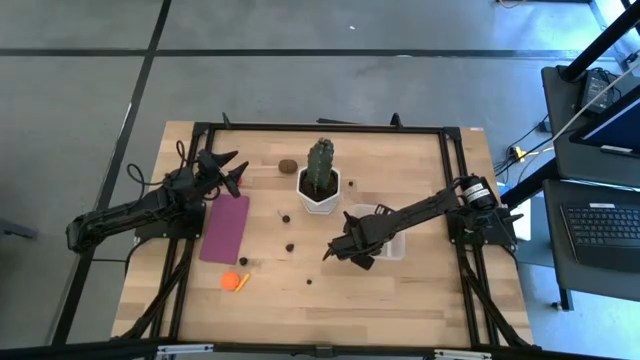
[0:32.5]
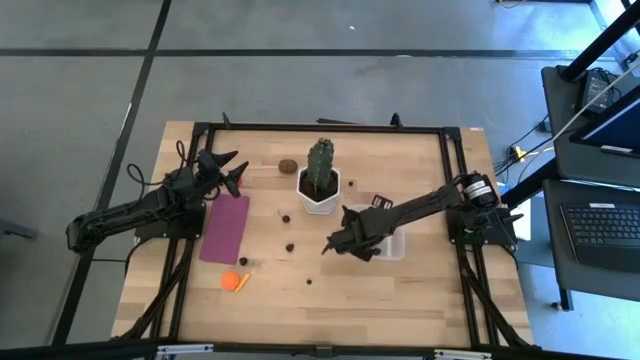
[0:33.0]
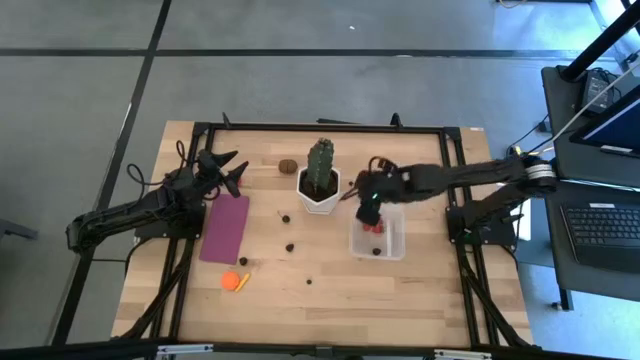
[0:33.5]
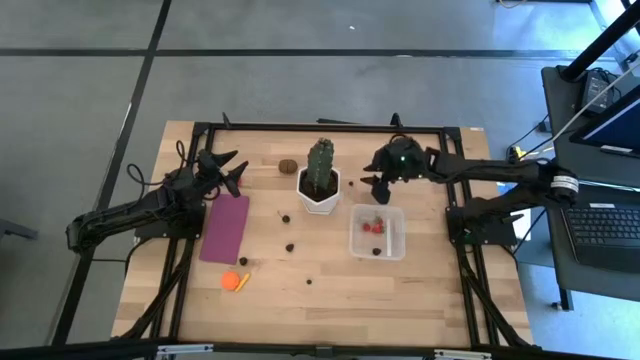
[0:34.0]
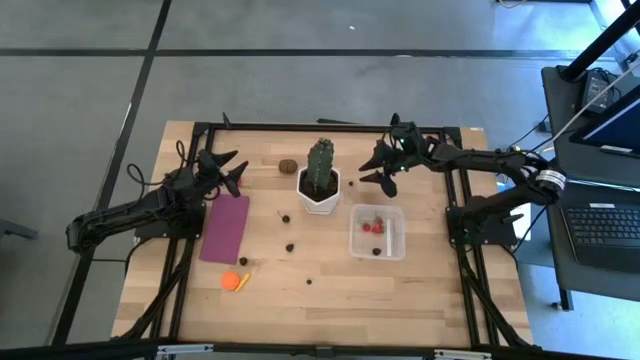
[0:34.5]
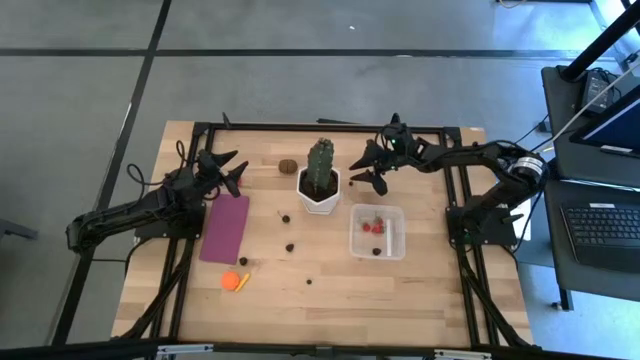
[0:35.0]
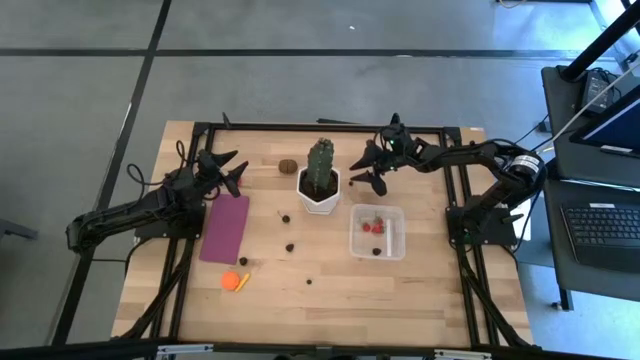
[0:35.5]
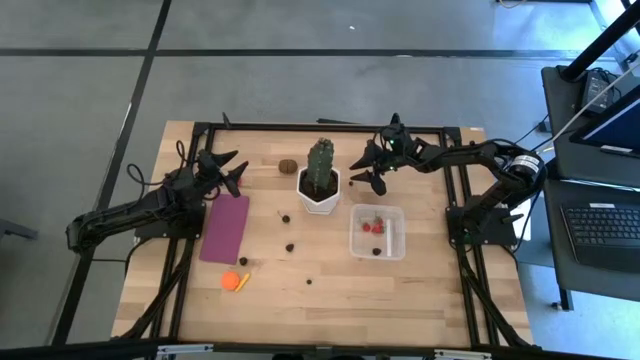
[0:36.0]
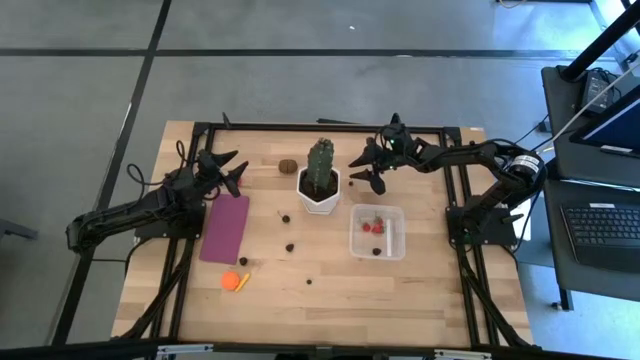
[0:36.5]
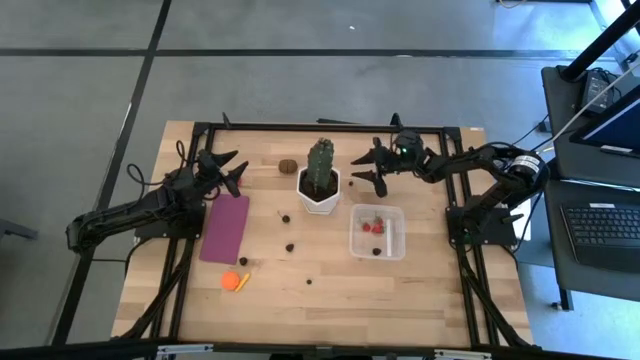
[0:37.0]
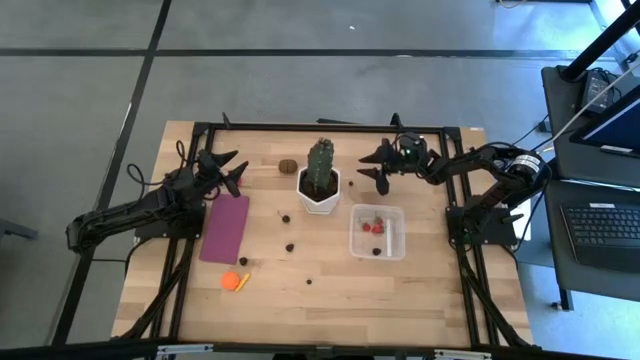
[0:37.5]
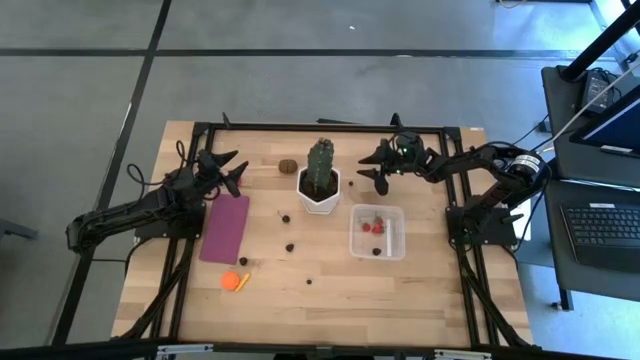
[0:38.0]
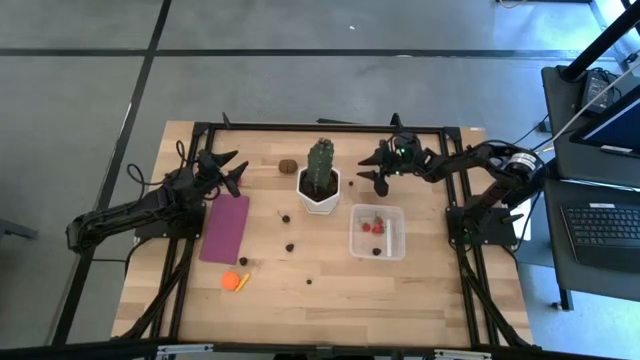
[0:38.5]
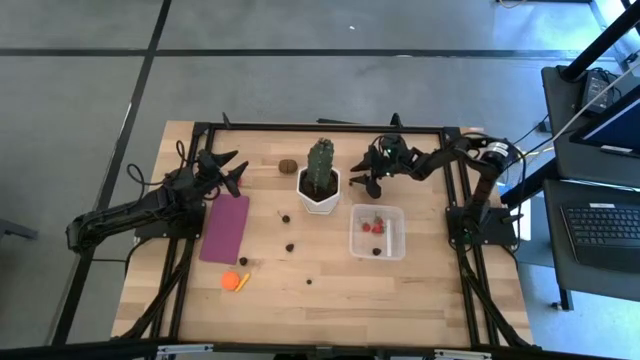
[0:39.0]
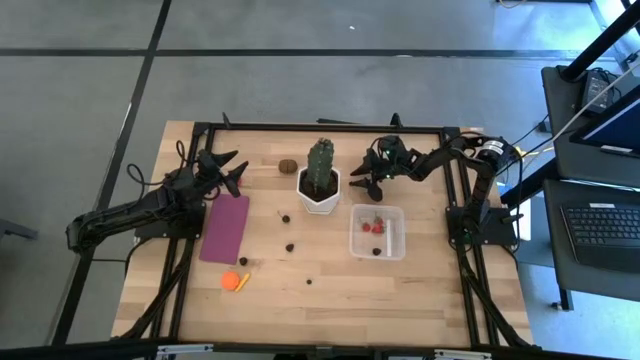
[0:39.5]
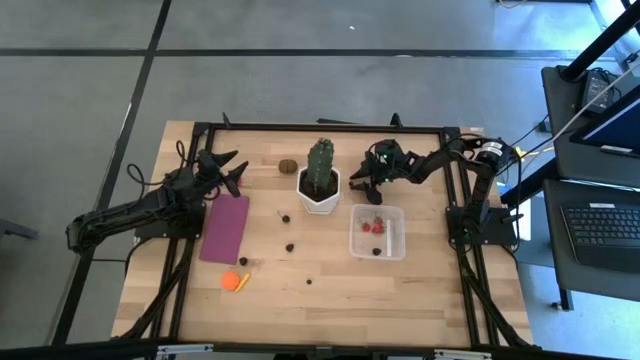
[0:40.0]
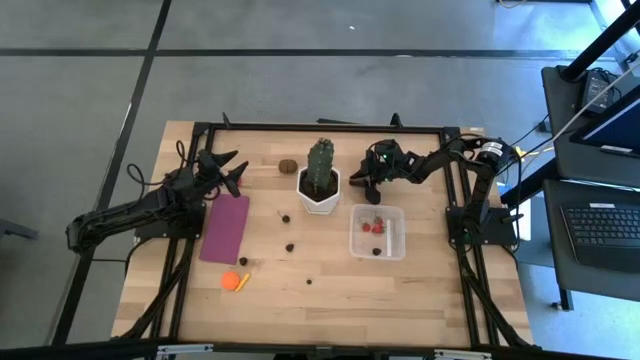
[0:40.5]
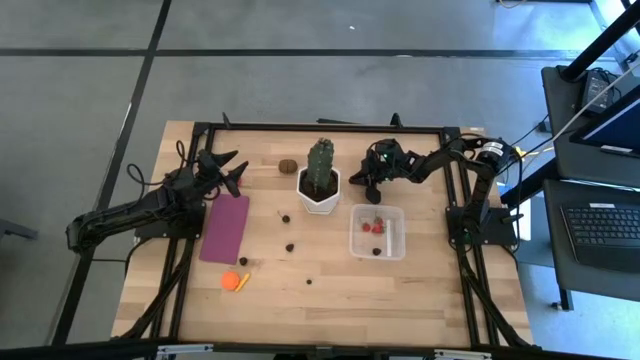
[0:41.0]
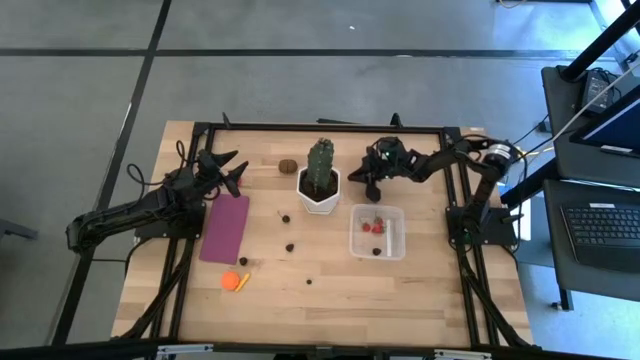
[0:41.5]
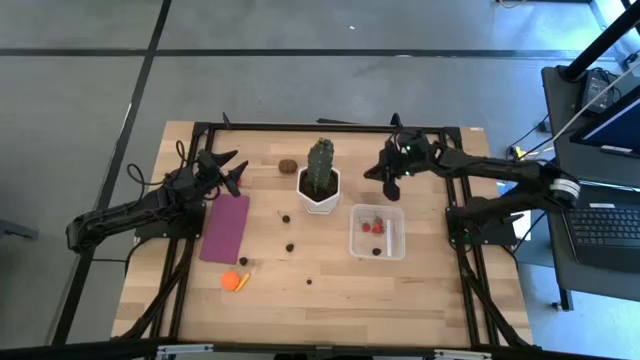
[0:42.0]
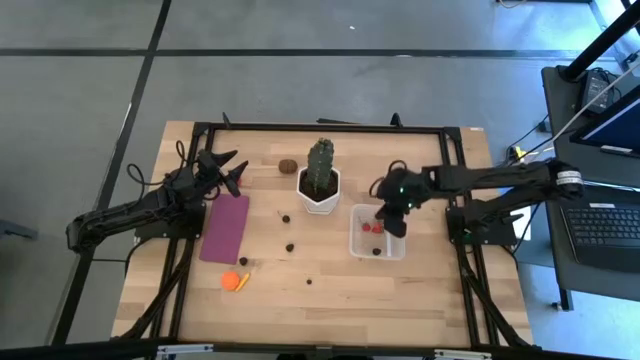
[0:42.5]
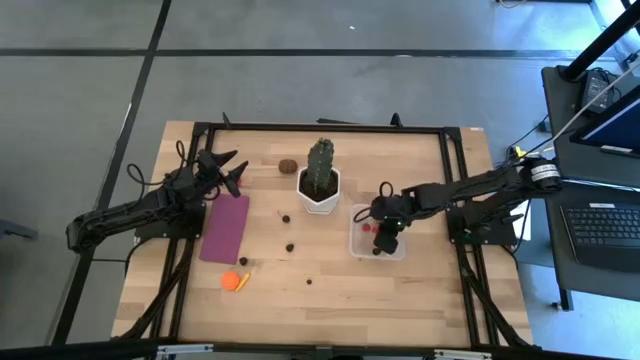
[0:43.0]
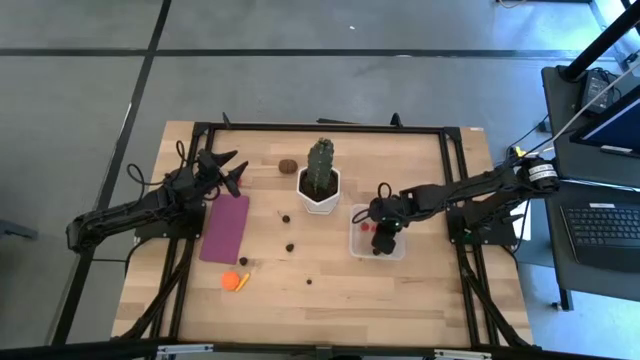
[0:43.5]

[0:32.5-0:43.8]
Task: Pick and placing Produce into tupperware
Put the blueberry into the transparent bin

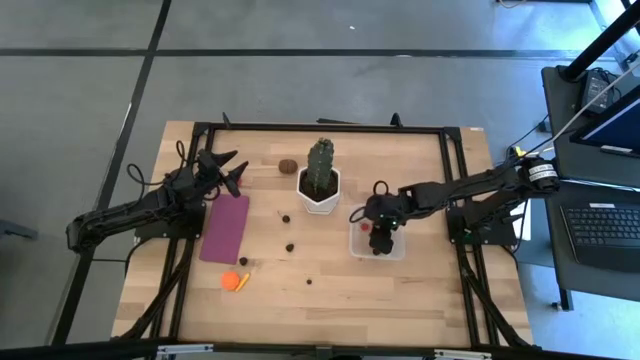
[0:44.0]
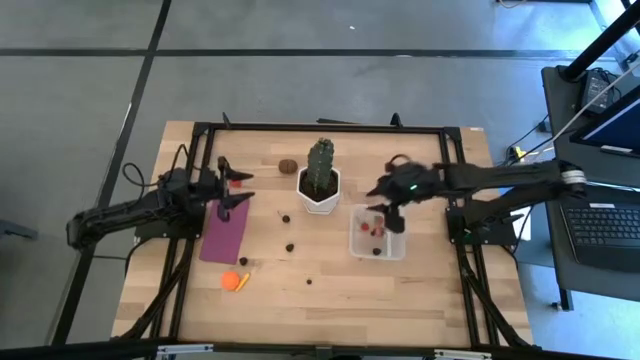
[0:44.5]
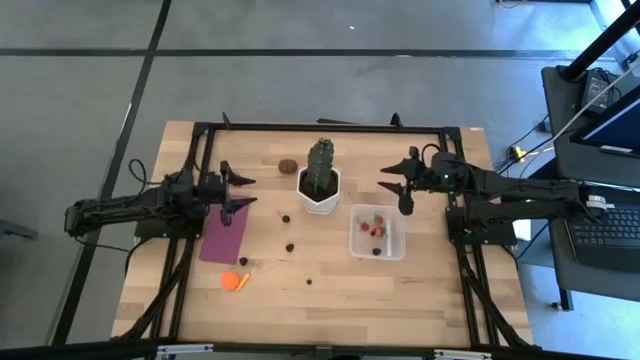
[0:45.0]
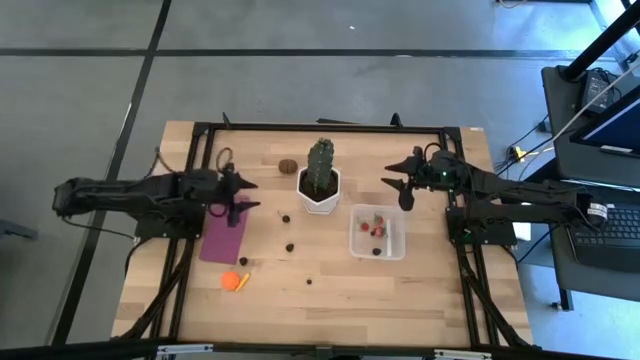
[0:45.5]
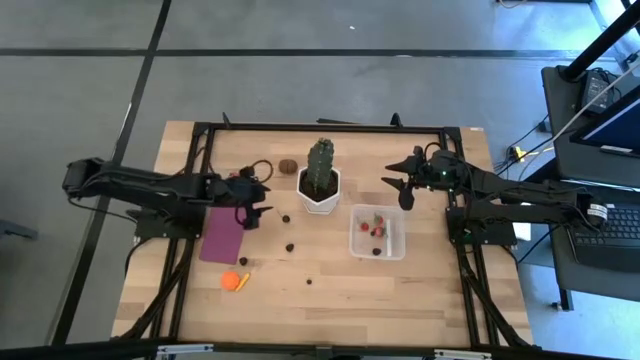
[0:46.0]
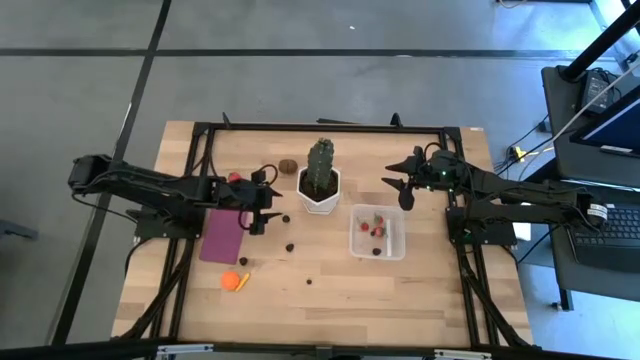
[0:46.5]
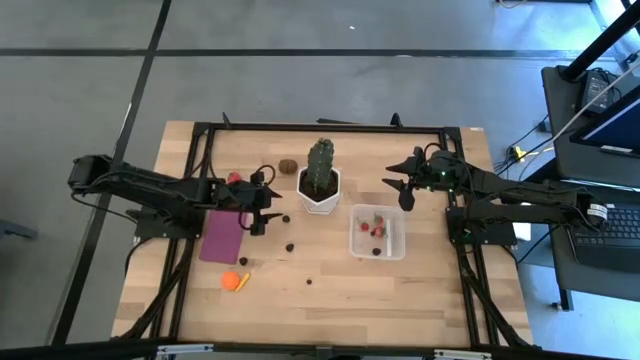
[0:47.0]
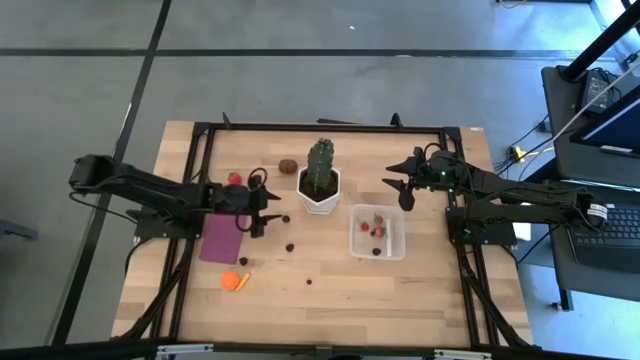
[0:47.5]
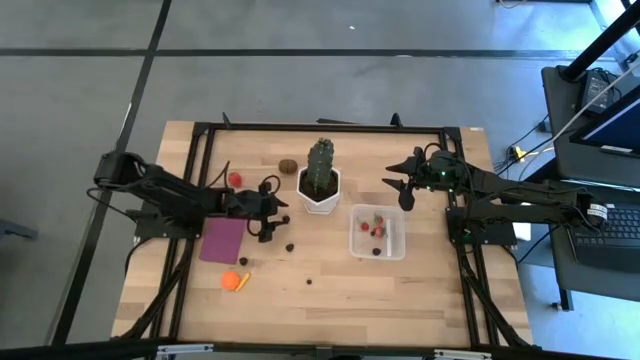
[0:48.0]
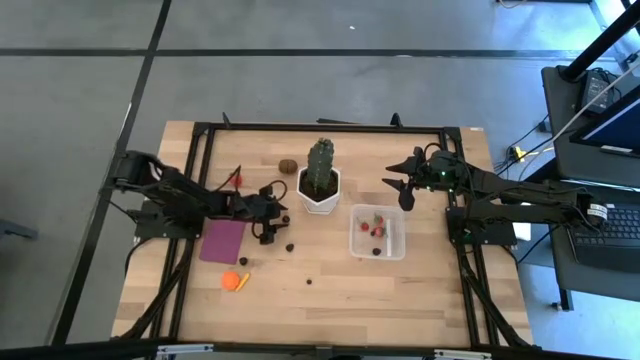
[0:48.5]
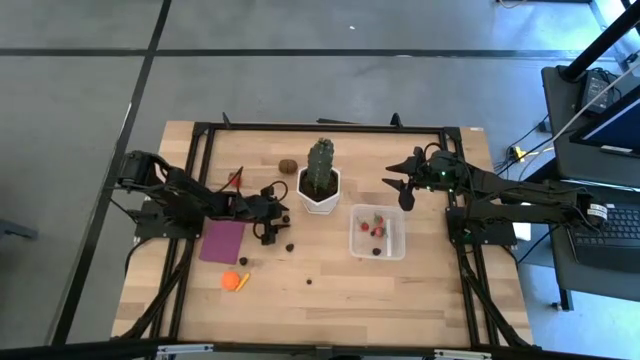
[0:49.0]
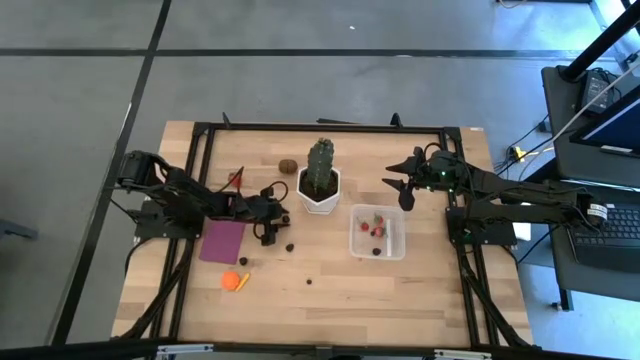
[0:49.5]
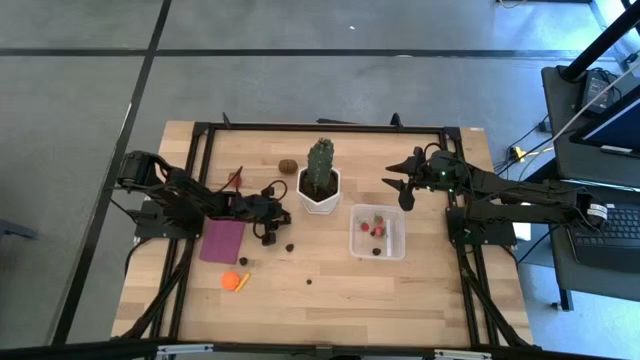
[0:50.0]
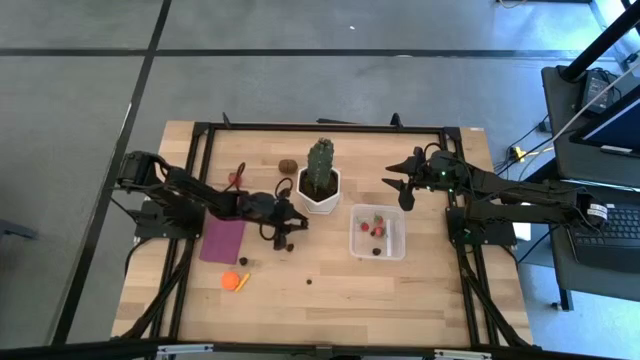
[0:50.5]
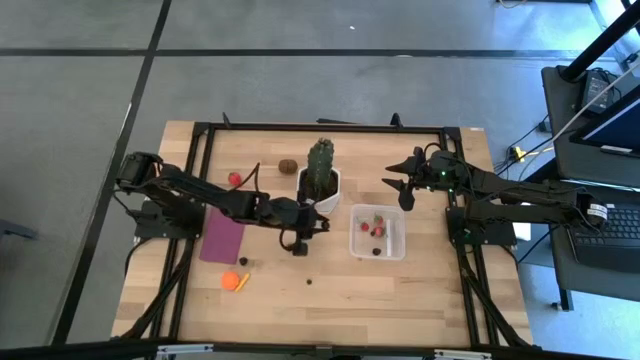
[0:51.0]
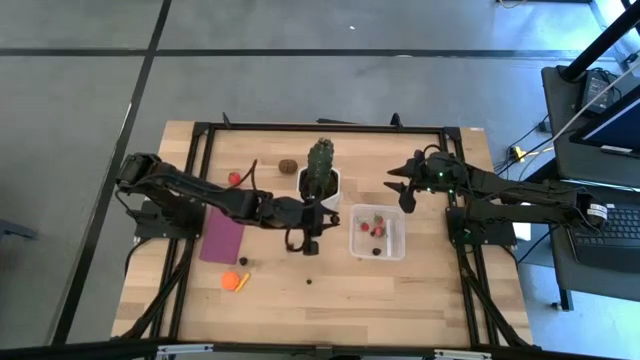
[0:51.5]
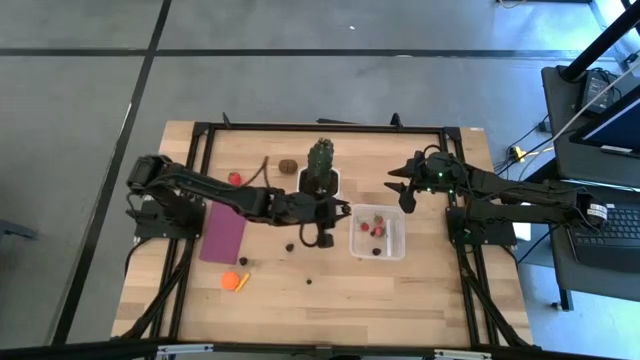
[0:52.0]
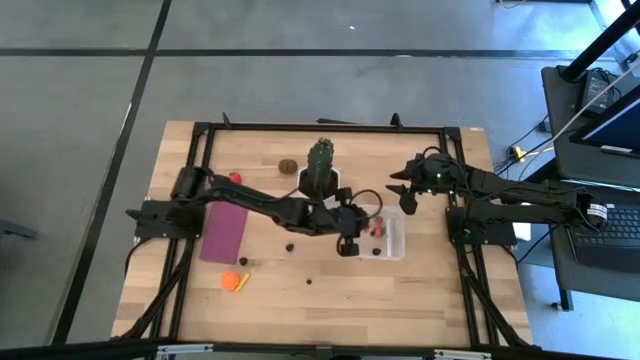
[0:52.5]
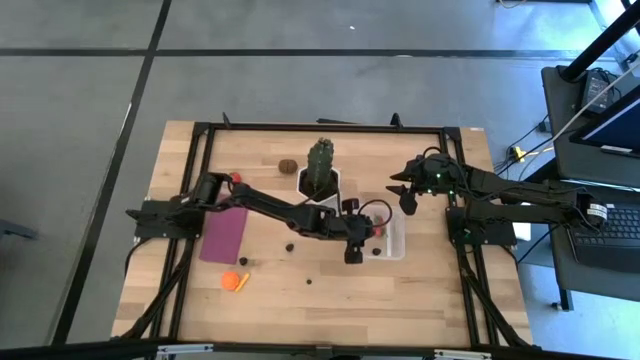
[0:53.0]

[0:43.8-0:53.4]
Put the black cherry into the transparent bin

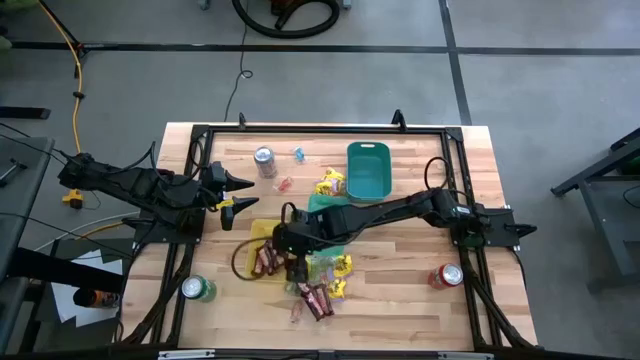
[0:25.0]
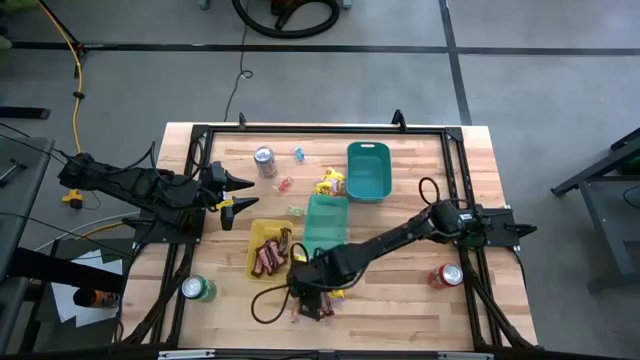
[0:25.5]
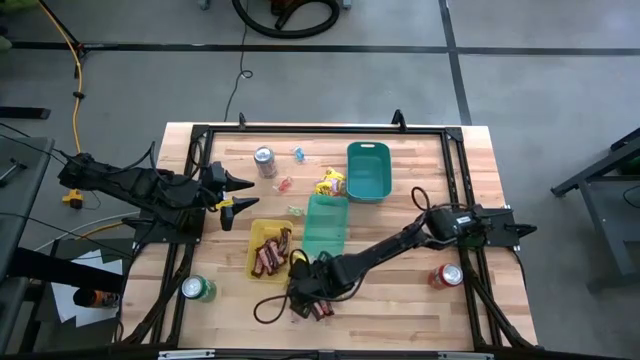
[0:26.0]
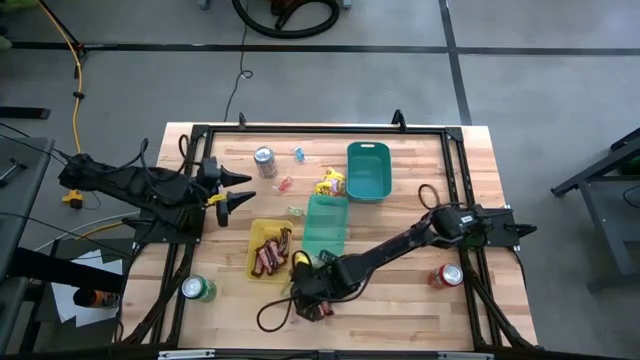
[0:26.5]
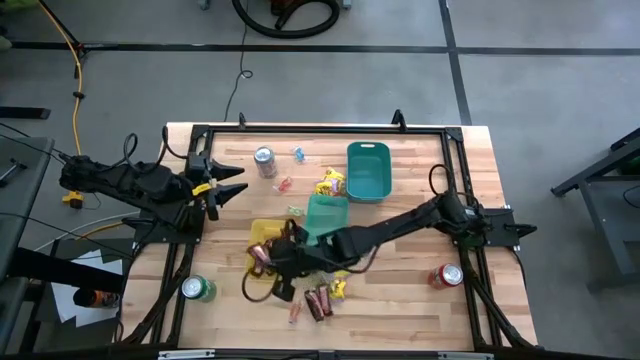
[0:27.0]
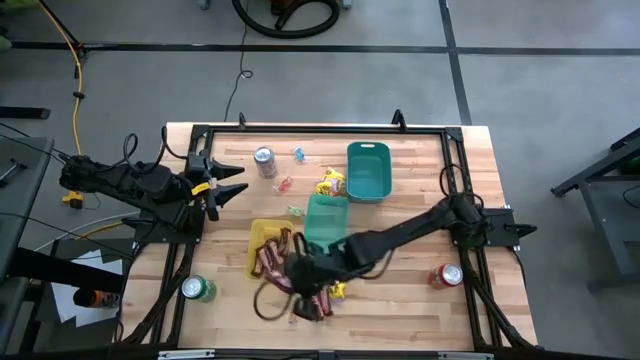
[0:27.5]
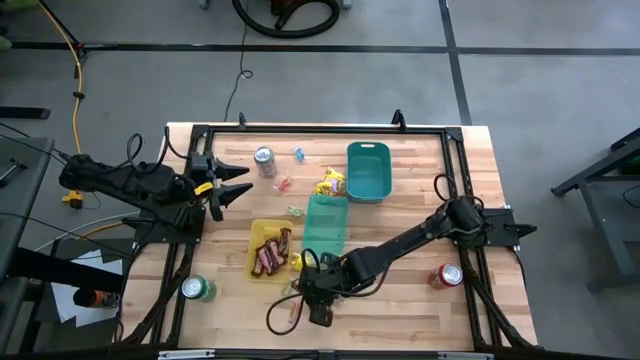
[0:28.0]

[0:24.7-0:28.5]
Task: Sort candy
Put the brown chocolate bar into the yellow bin
